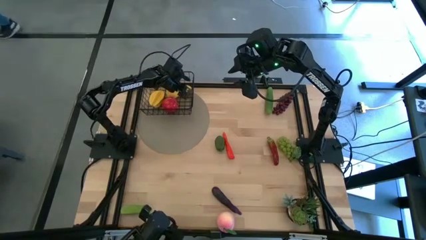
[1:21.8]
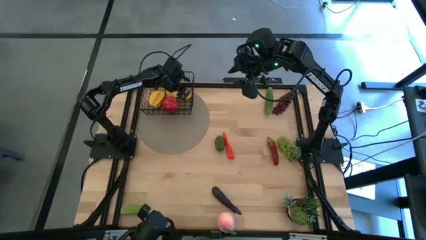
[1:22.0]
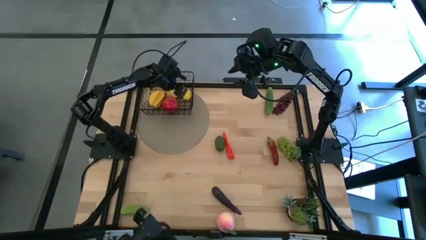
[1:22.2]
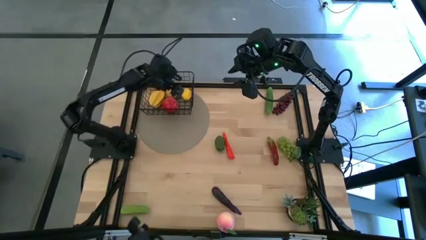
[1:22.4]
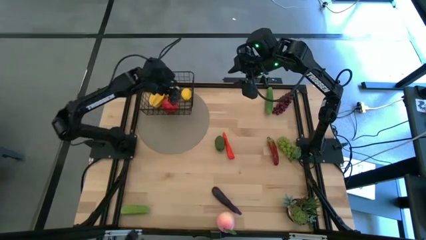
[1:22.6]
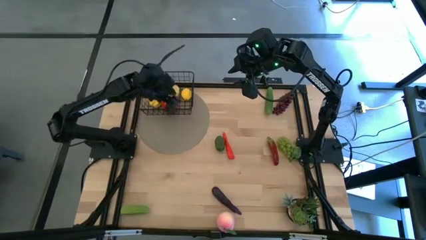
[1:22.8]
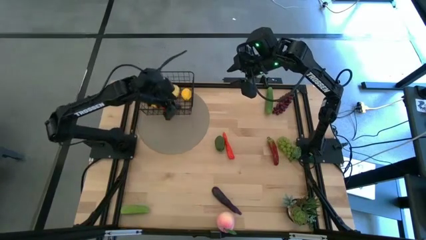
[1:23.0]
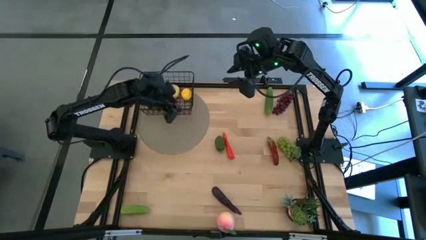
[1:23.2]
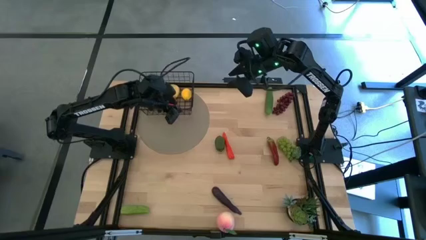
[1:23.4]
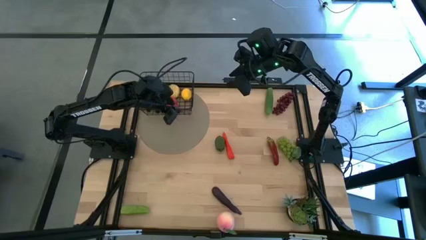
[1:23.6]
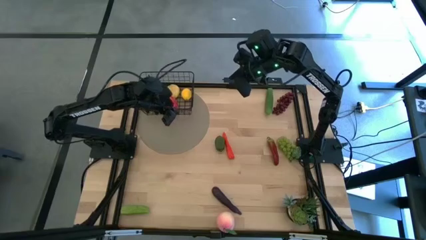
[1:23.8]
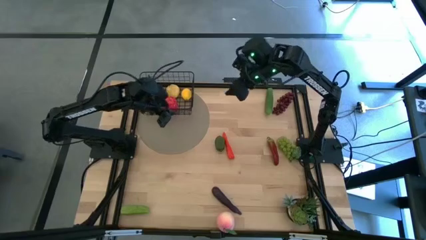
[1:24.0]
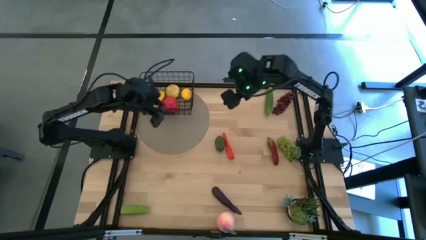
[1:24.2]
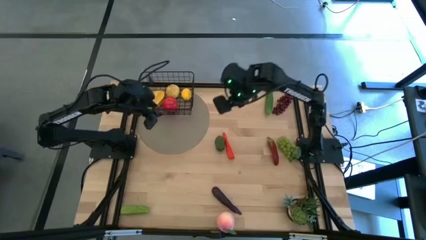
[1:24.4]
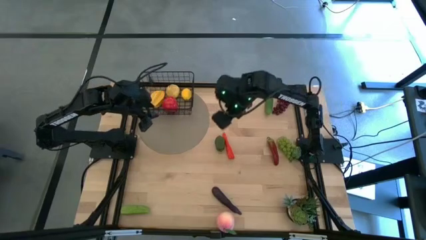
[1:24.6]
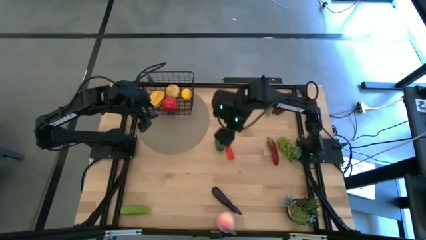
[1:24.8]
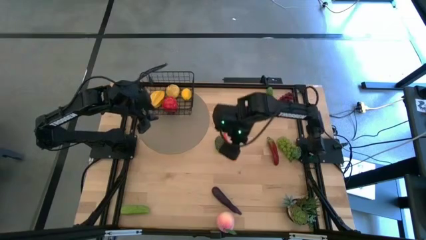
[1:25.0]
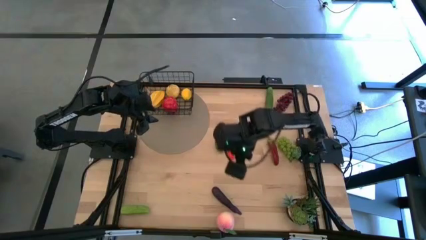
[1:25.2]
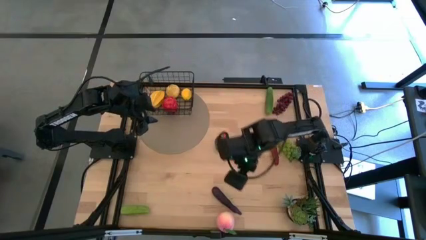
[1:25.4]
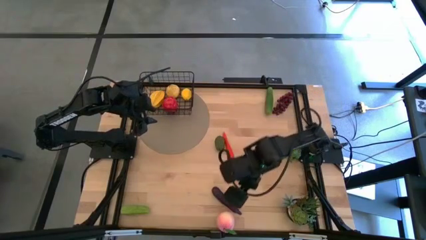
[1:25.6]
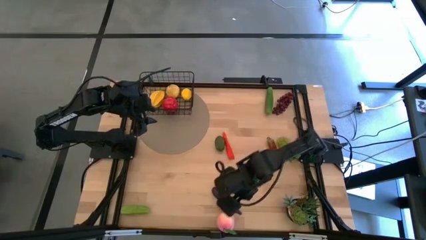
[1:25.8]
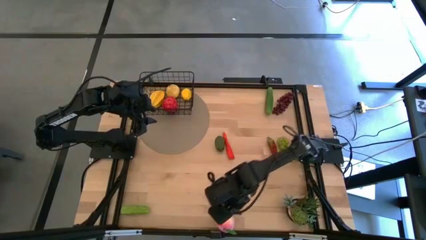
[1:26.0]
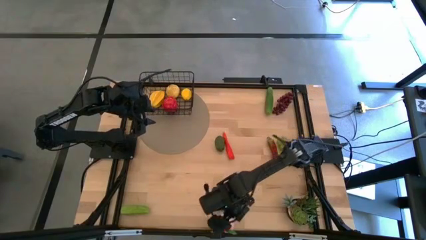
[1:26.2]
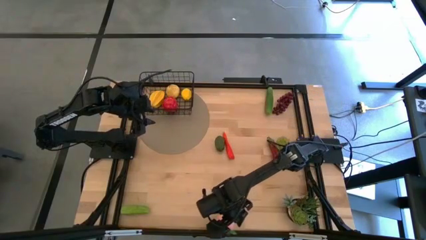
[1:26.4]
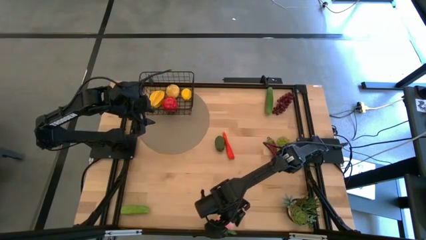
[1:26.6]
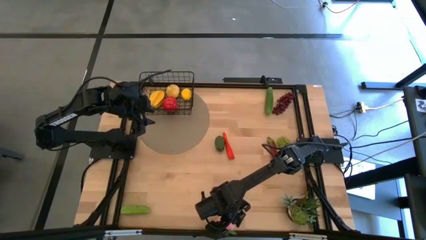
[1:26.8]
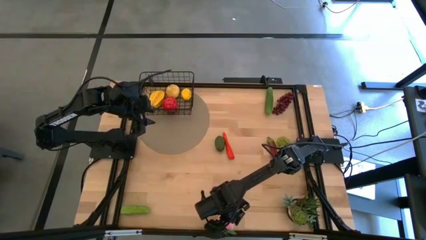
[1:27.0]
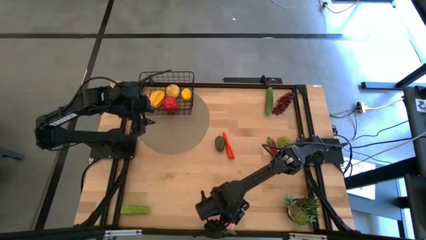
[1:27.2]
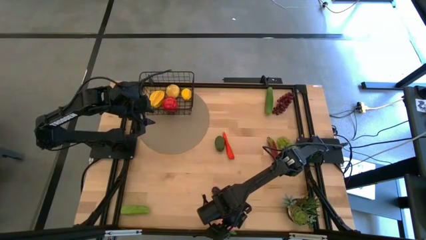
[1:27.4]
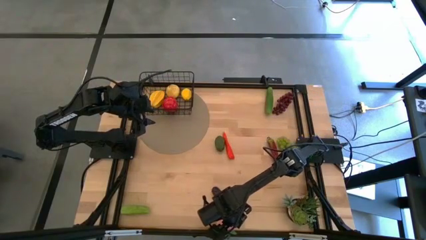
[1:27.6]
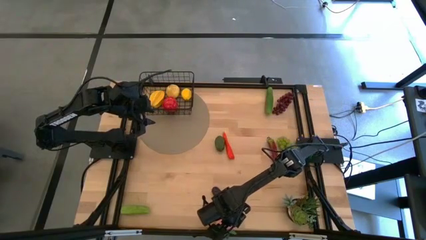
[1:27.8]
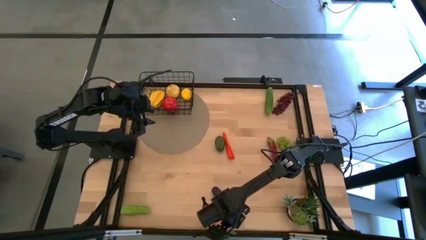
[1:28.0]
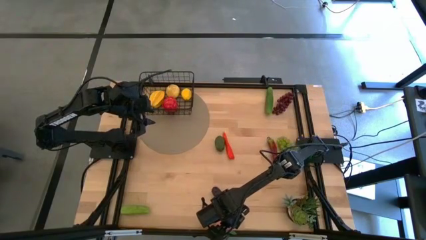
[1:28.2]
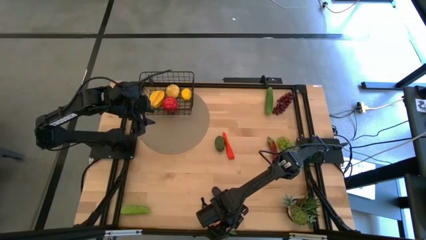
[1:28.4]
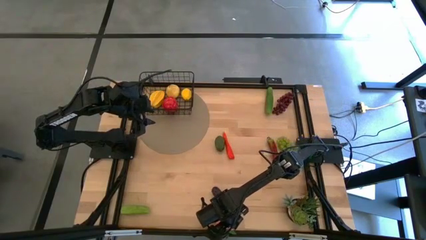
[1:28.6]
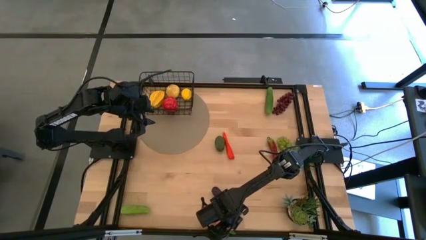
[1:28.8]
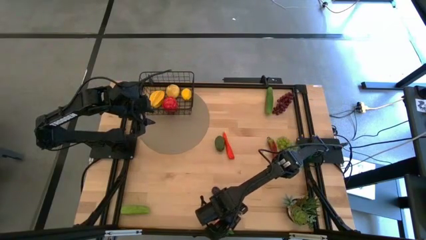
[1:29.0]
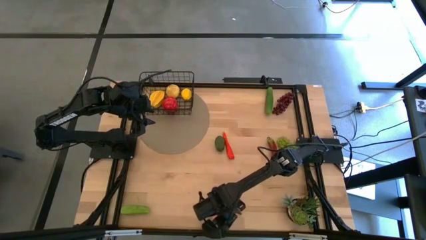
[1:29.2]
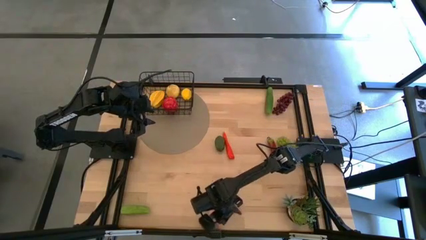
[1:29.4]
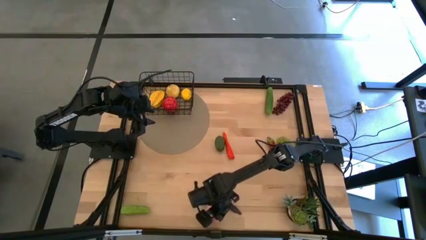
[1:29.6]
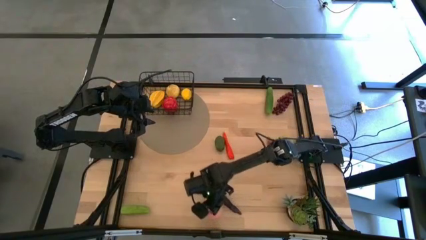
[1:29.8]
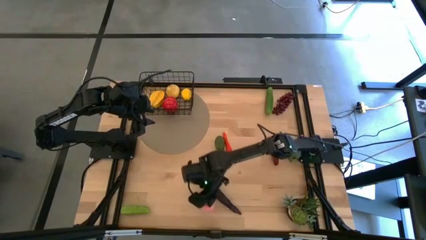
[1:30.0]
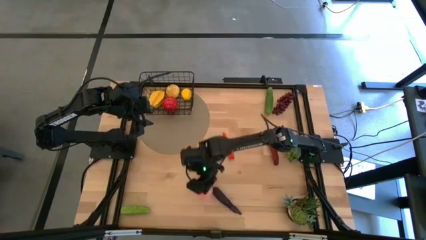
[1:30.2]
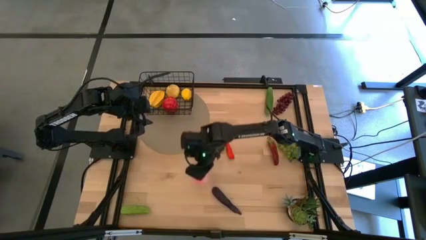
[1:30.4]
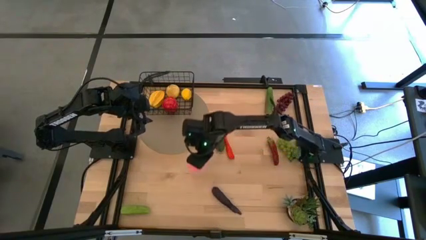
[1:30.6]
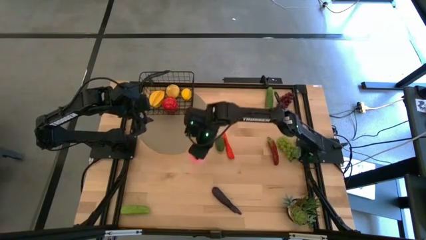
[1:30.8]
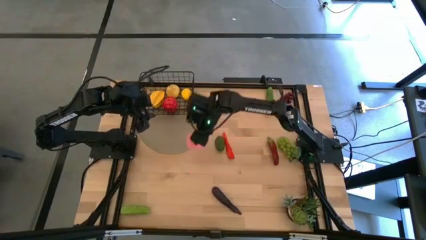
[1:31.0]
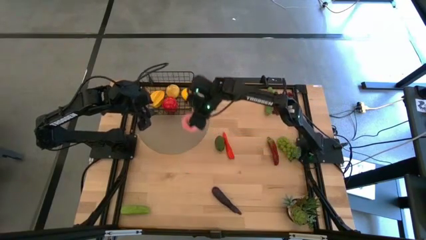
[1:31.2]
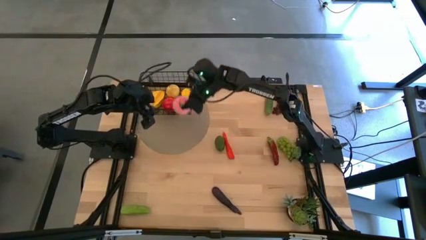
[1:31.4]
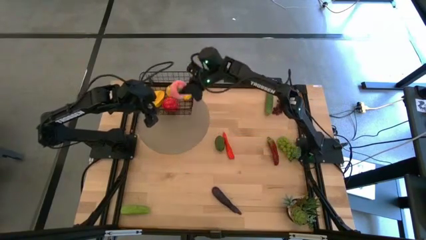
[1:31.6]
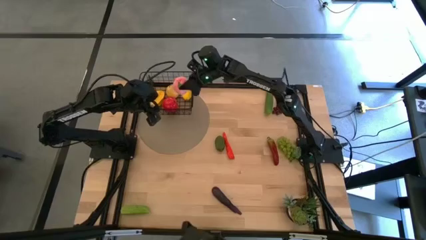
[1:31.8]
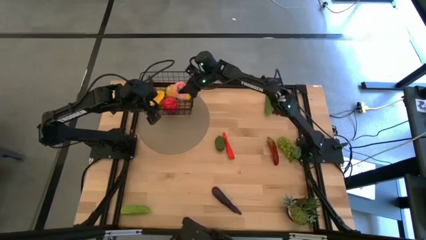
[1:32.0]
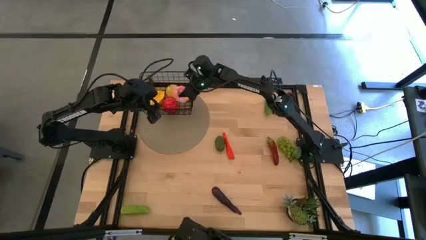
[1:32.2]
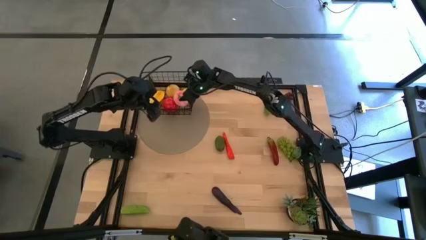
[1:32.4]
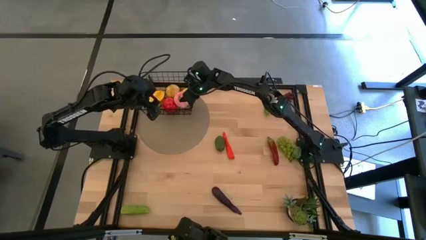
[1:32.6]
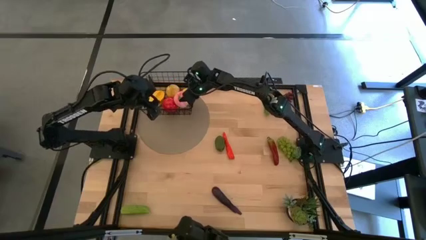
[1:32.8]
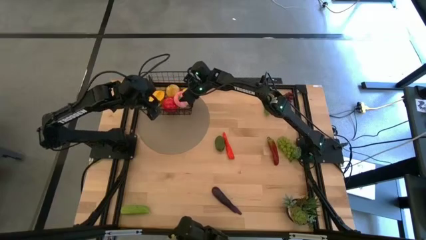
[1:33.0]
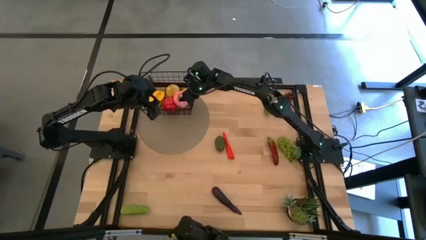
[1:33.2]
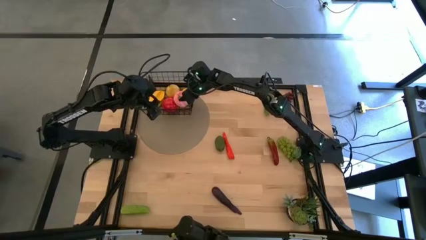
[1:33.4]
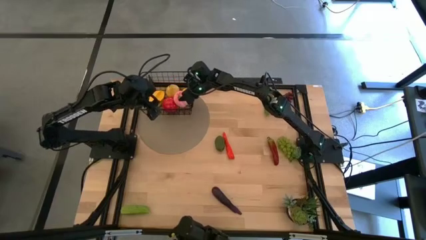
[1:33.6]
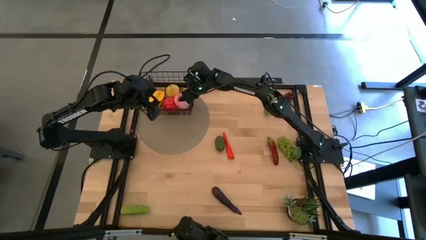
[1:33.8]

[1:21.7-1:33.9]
Task: Build produce basket
Put the pink peach into the black wire basket

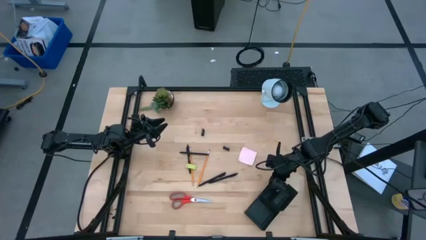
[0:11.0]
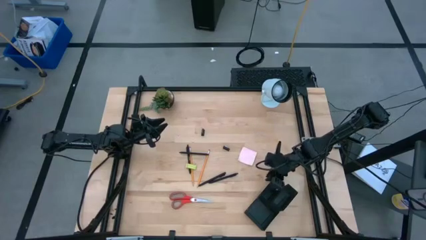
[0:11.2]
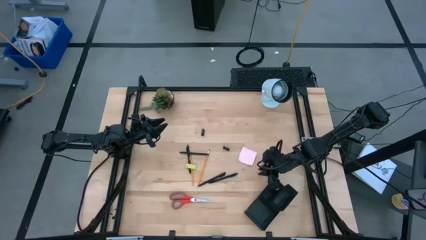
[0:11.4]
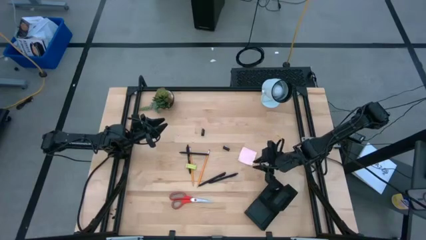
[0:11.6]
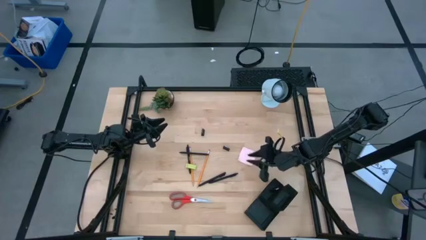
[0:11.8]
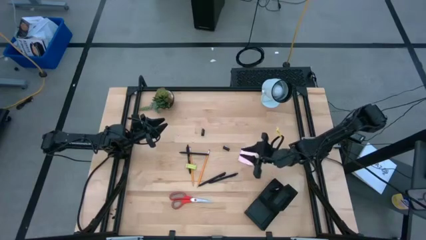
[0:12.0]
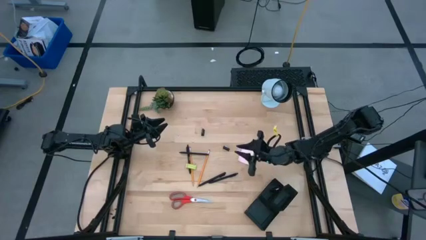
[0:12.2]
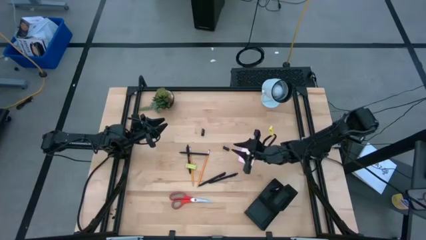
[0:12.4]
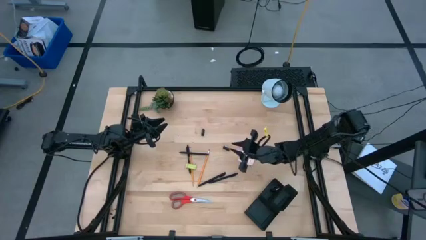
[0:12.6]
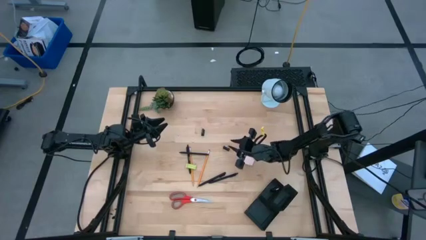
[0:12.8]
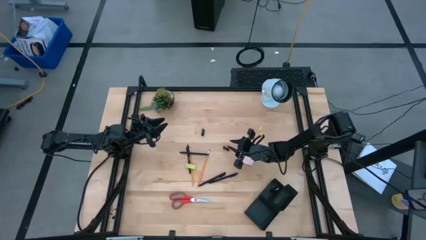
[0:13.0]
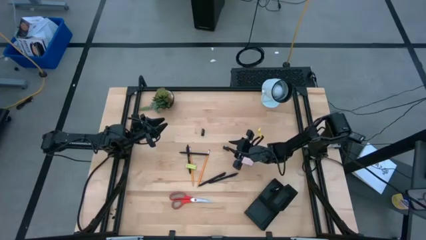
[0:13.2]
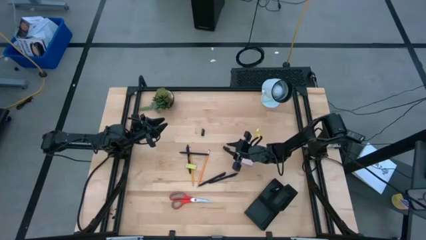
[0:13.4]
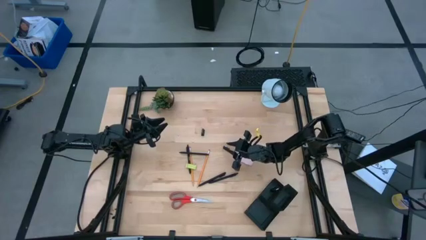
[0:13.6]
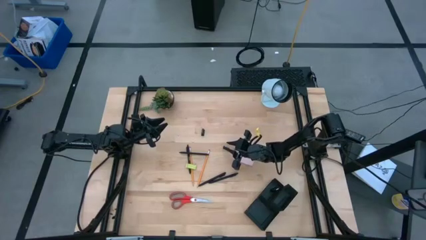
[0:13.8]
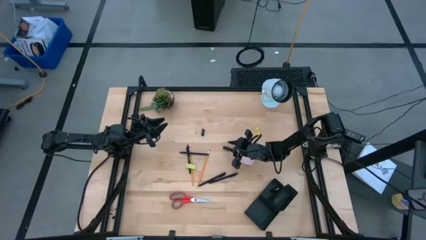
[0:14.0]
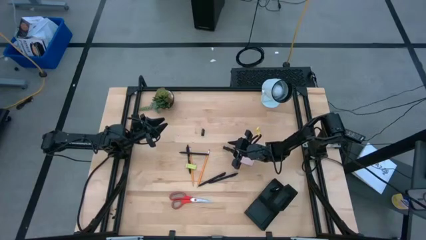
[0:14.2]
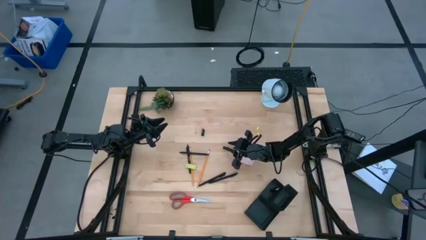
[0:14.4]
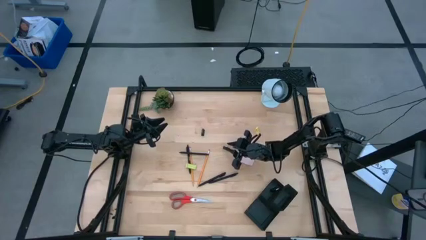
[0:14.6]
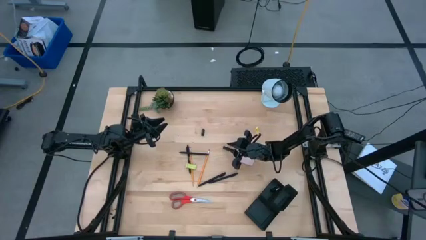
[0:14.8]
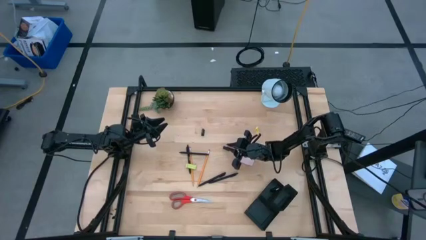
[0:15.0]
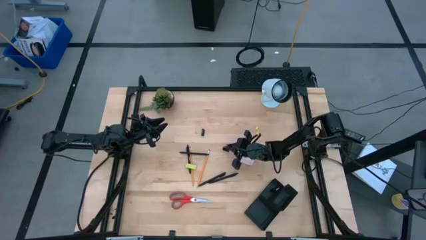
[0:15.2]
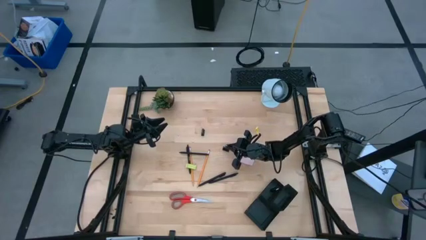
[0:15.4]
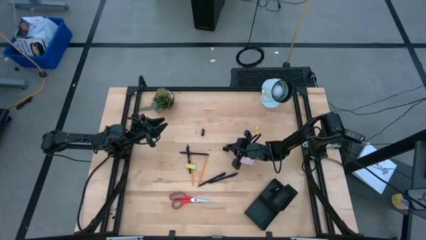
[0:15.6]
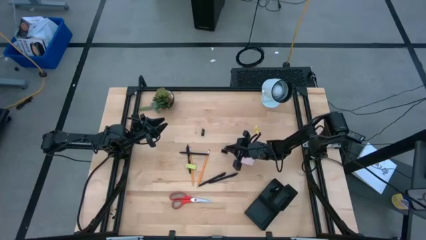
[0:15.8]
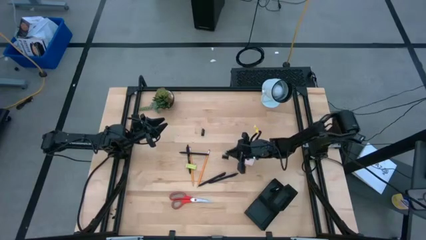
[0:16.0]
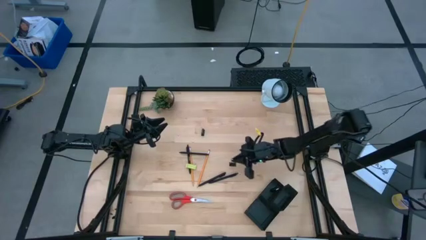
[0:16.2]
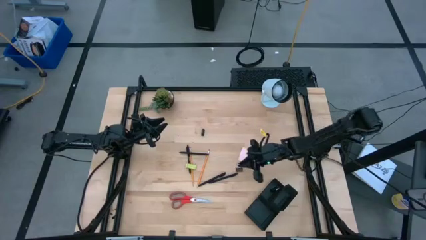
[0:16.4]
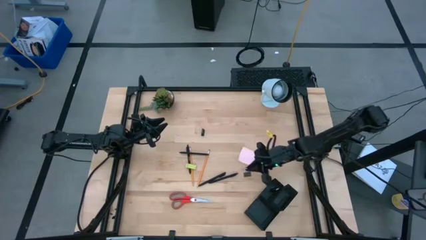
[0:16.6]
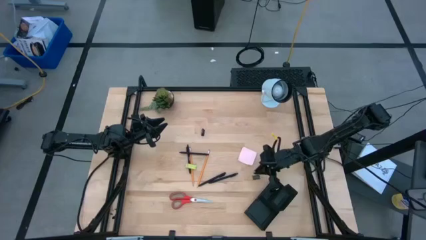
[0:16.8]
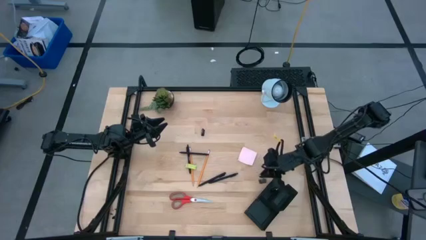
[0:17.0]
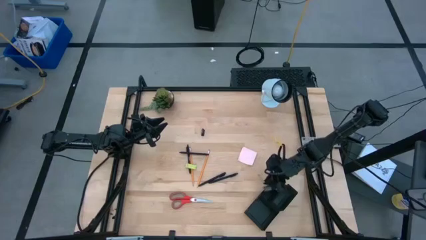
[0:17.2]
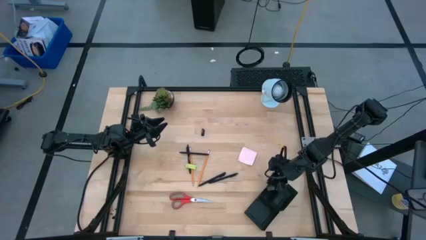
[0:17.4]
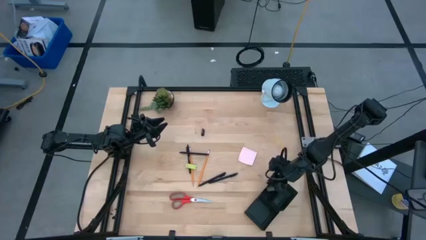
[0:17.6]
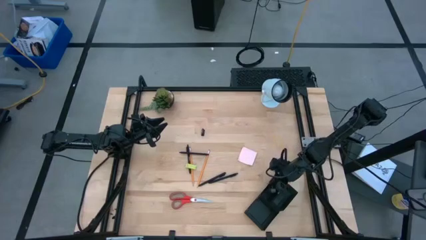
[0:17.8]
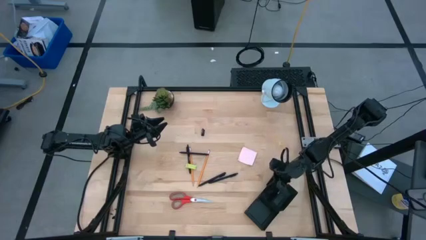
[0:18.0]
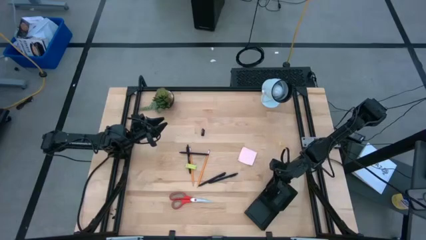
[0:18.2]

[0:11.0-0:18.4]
Task: Pick and place office supplies into organizer
Put the black clip binder into the desk organizer
